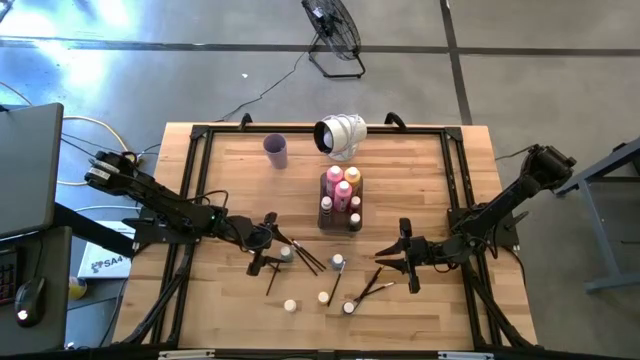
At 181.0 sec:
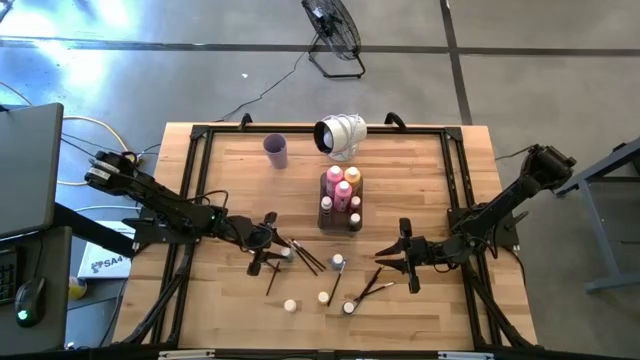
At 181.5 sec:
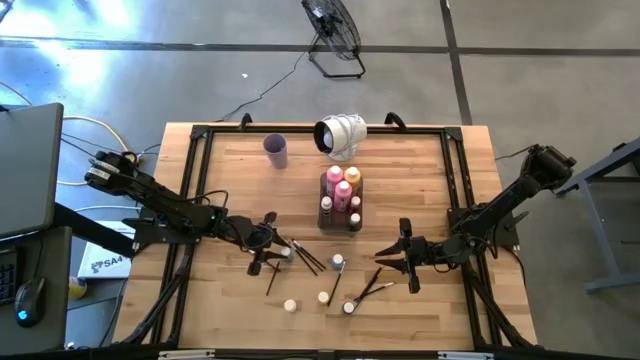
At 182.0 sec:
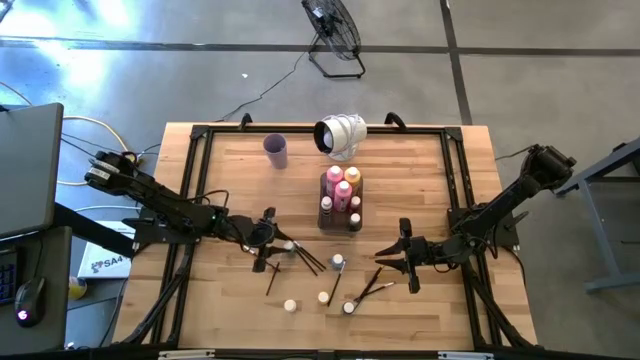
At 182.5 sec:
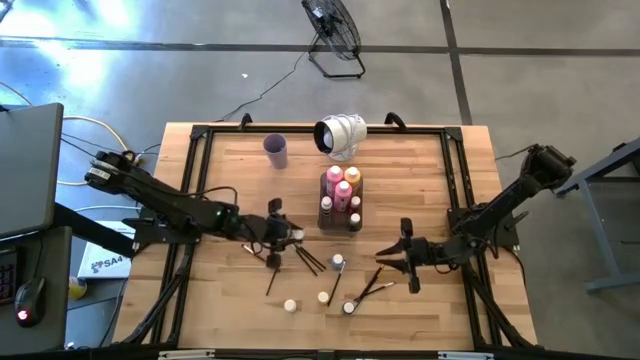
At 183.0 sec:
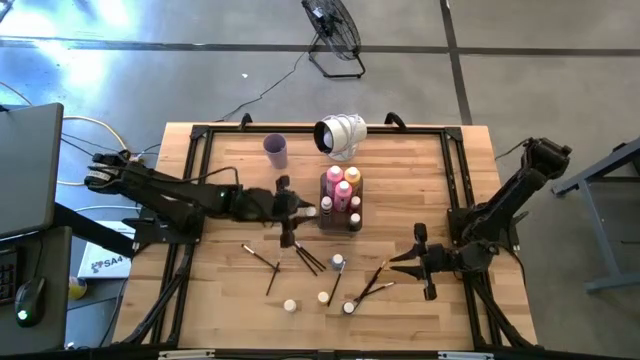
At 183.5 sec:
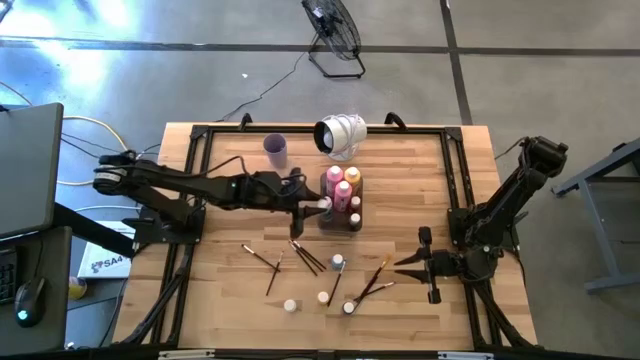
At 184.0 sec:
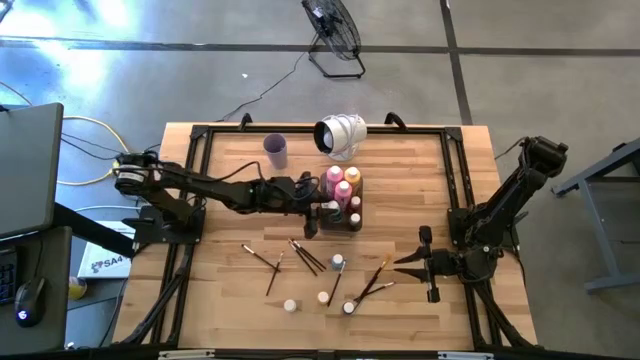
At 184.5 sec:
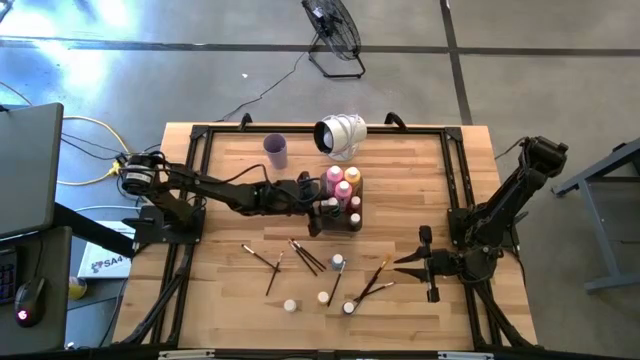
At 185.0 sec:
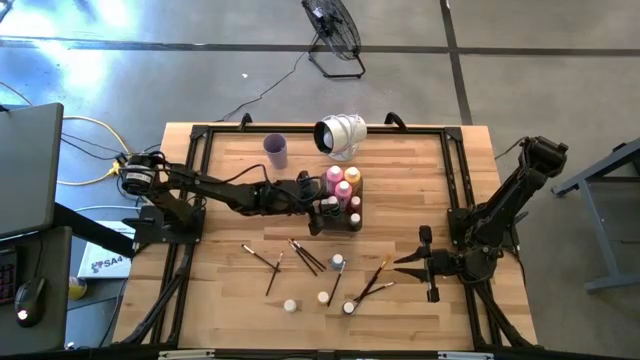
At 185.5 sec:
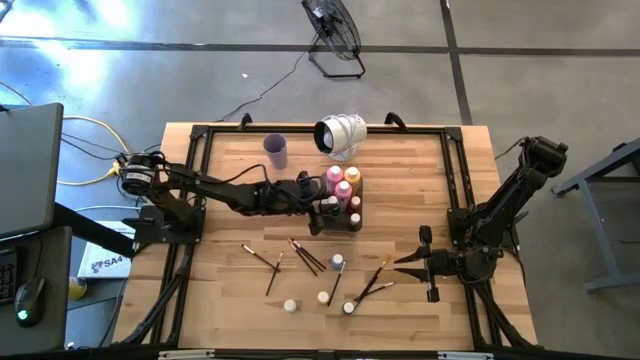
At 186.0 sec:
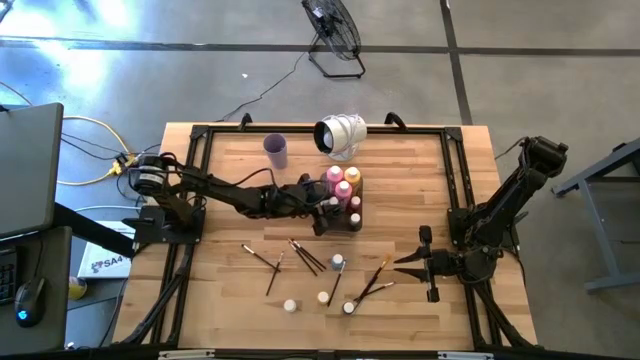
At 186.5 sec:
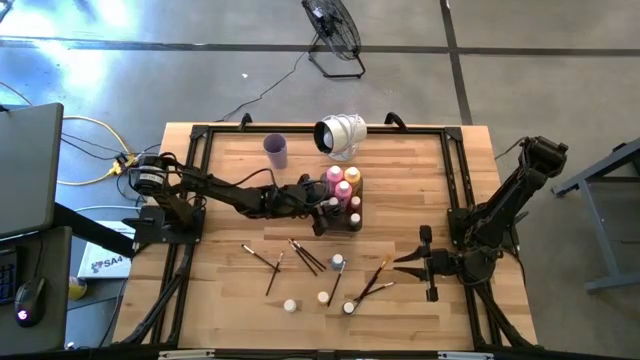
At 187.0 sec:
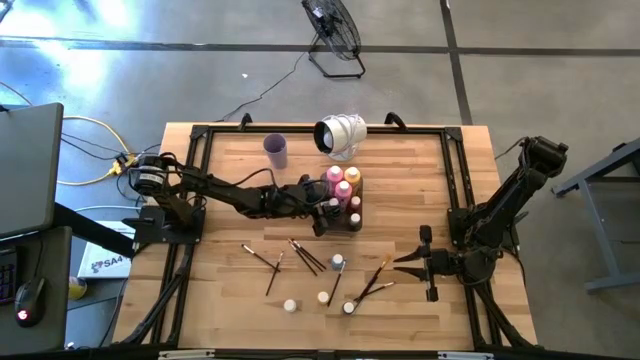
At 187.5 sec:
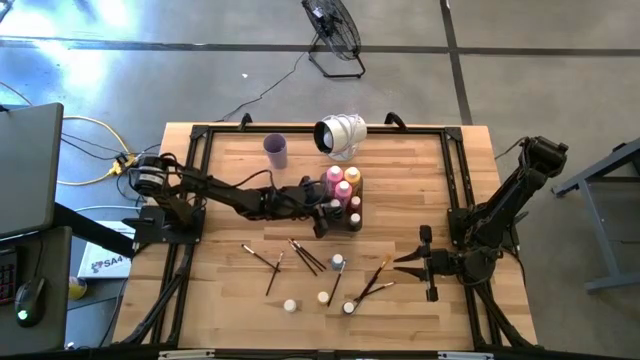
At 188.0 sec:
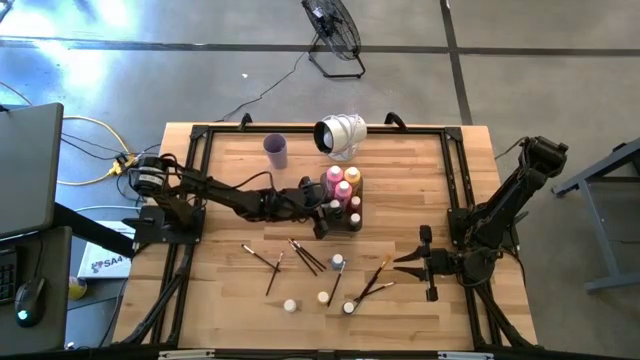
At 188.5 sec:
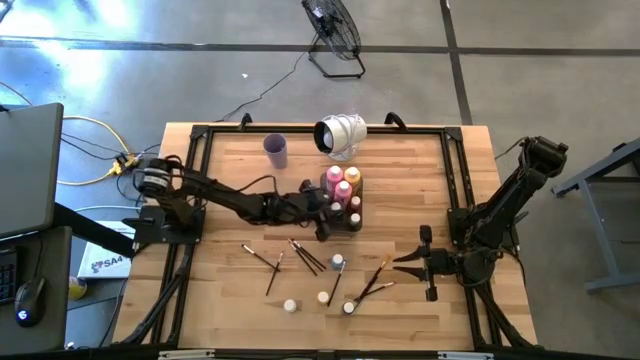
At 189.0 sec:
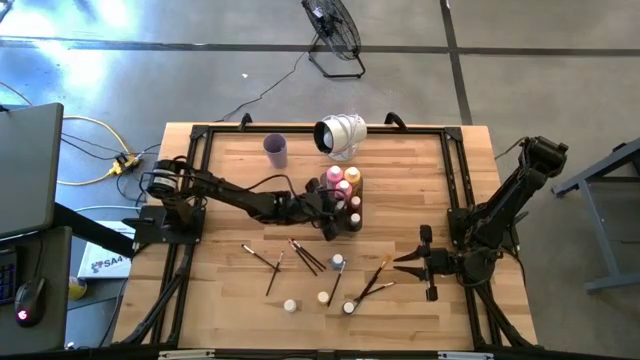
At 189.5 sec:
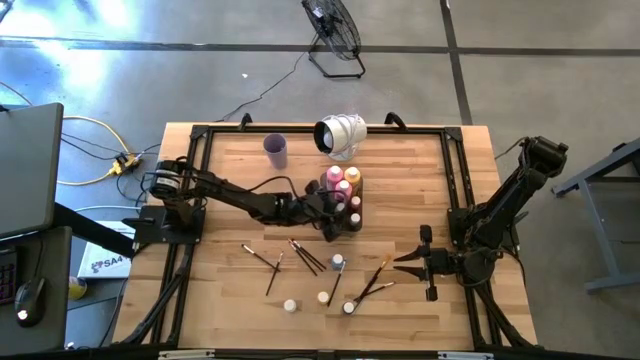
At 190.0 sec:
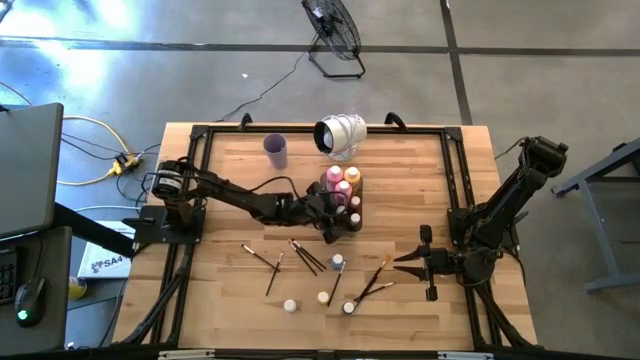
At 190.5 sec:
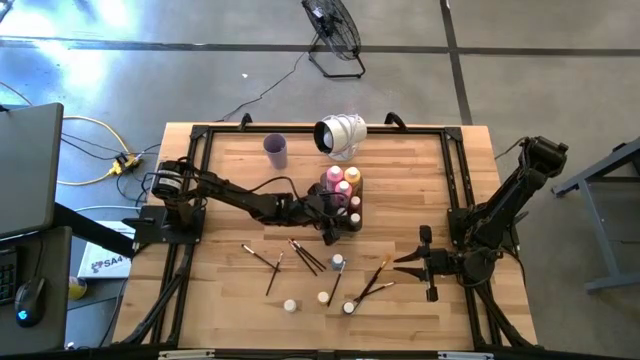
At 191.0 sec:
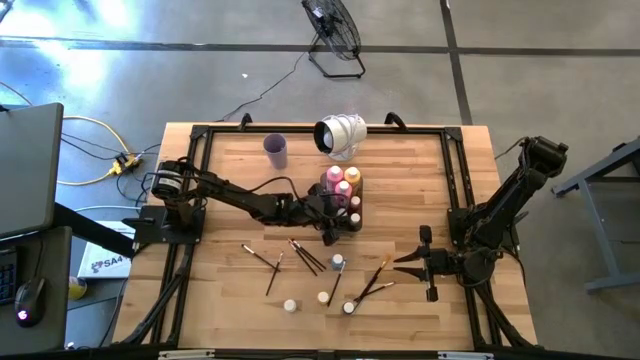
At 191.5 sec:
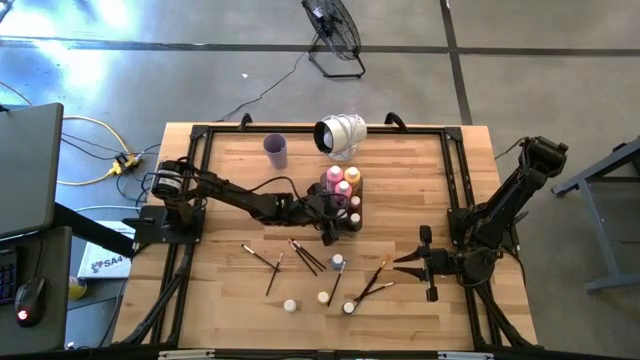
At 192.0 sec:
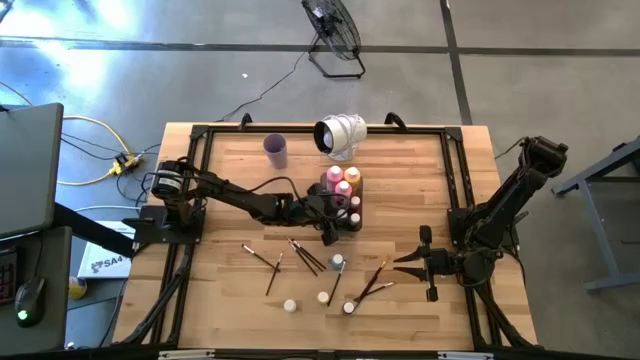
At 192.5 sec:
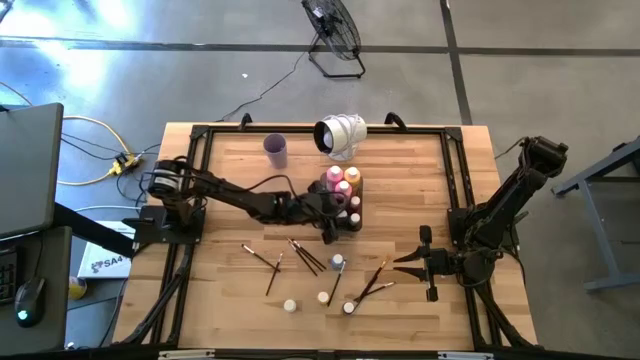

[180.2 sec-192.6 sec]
Task: Pick & Place Paint Supplies
Put the blue paint bottle into the black bin

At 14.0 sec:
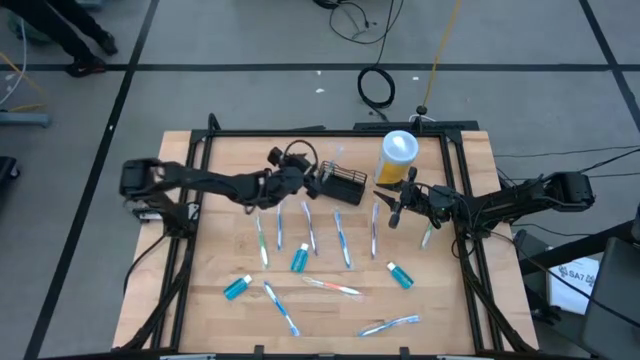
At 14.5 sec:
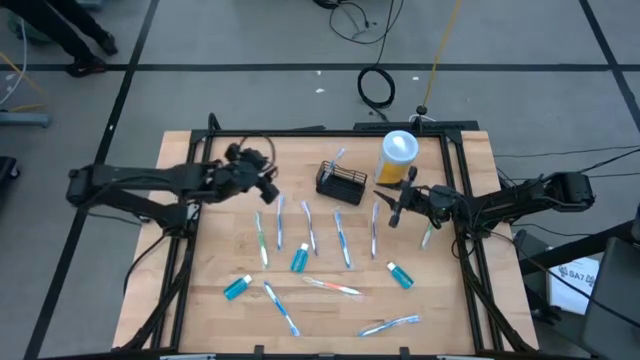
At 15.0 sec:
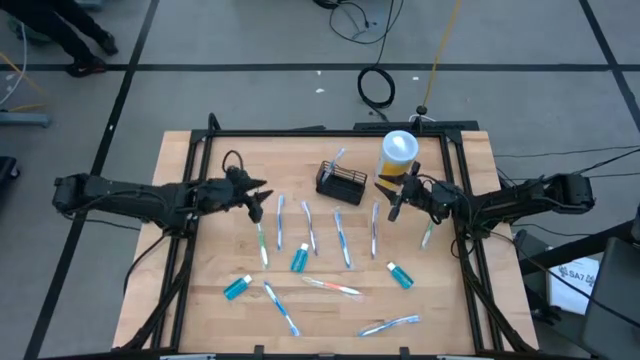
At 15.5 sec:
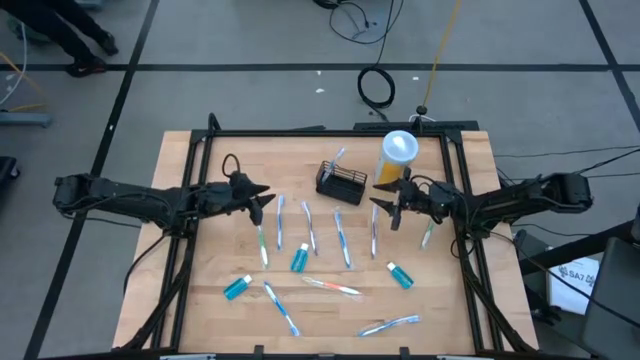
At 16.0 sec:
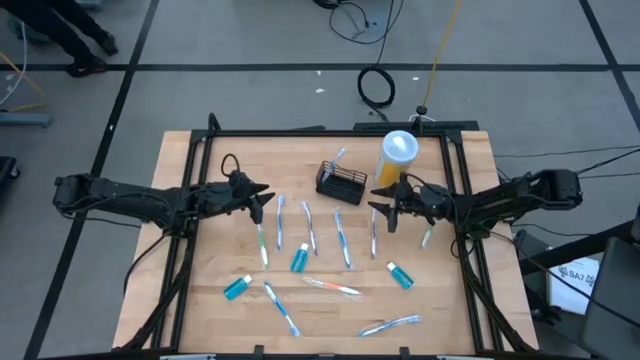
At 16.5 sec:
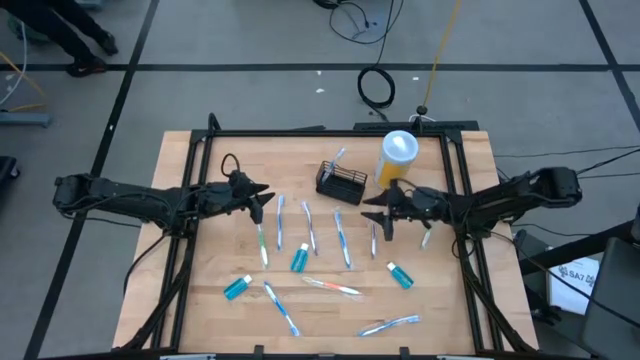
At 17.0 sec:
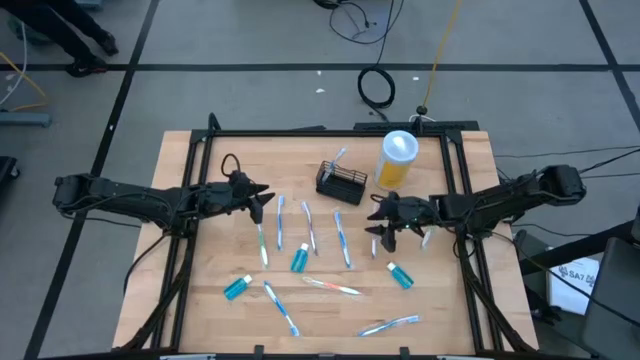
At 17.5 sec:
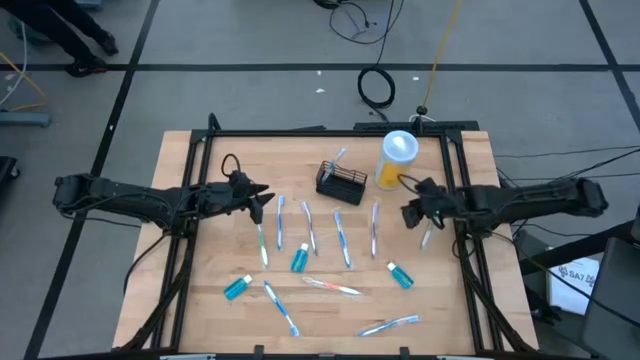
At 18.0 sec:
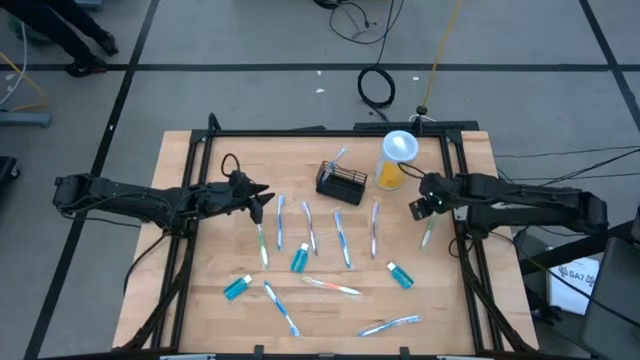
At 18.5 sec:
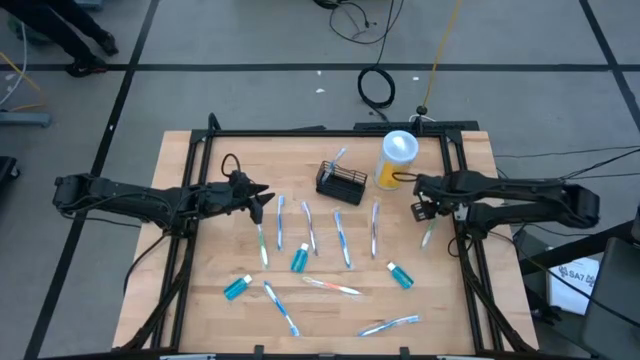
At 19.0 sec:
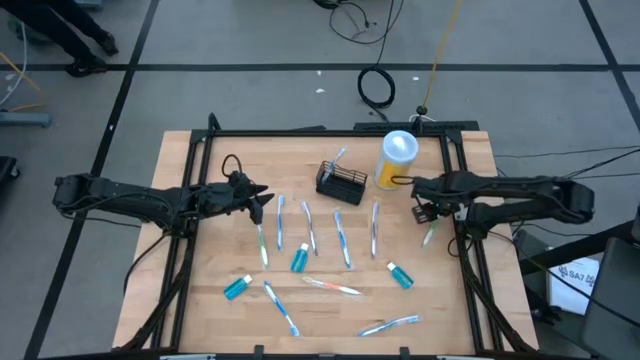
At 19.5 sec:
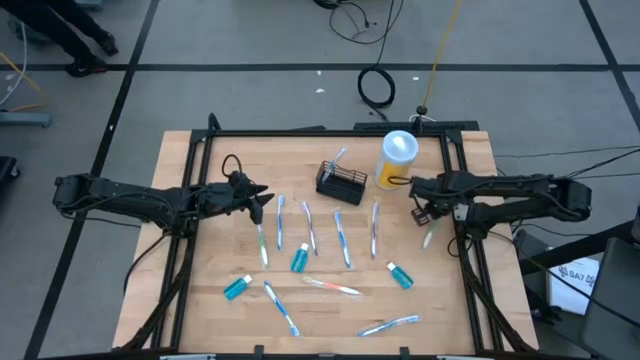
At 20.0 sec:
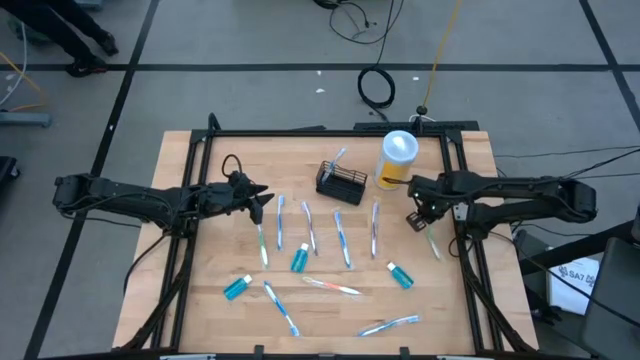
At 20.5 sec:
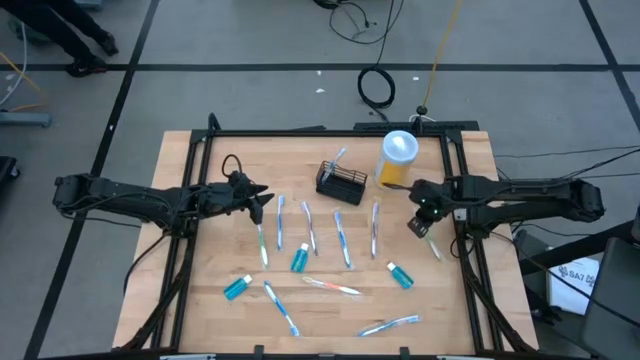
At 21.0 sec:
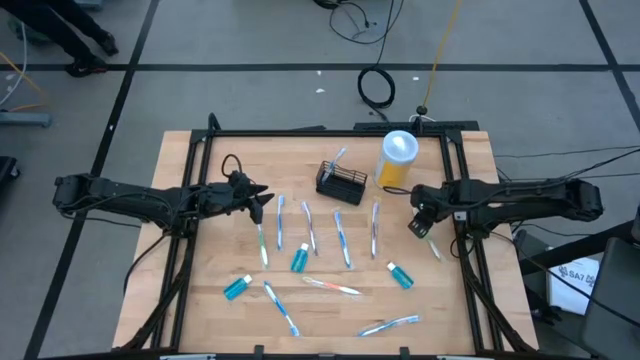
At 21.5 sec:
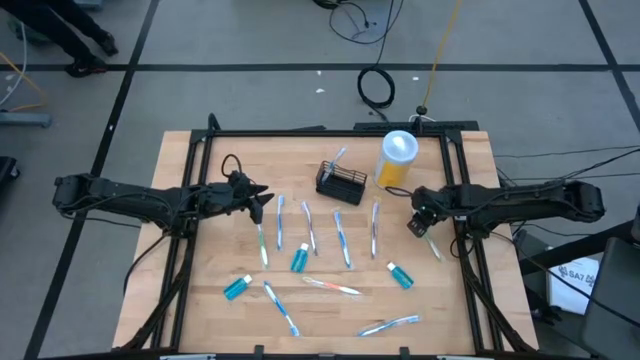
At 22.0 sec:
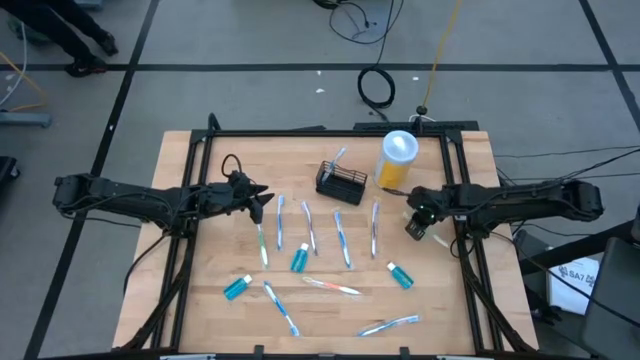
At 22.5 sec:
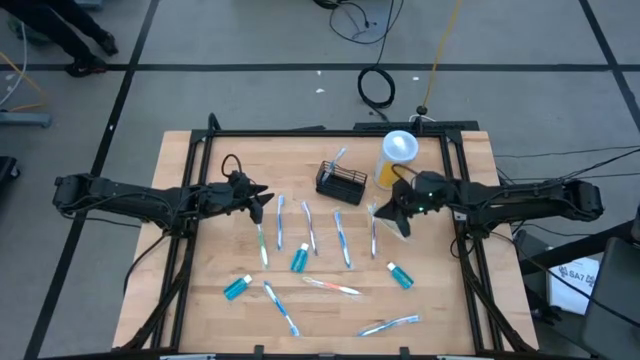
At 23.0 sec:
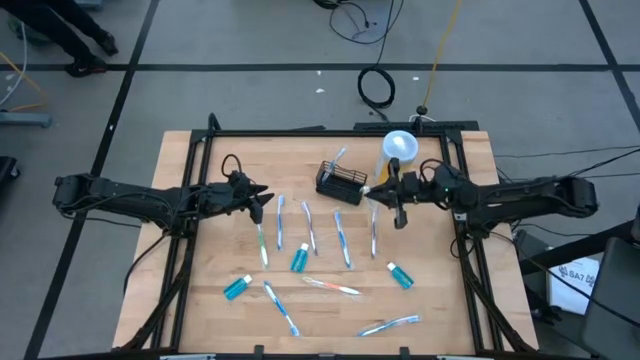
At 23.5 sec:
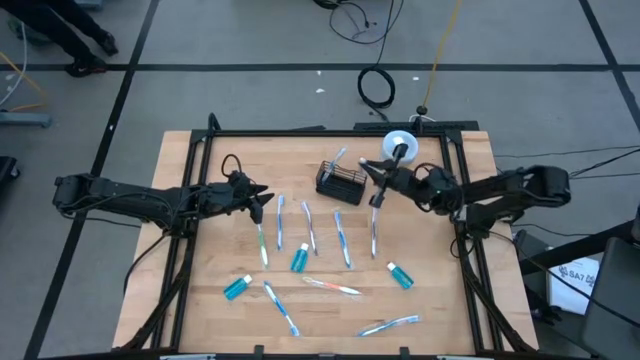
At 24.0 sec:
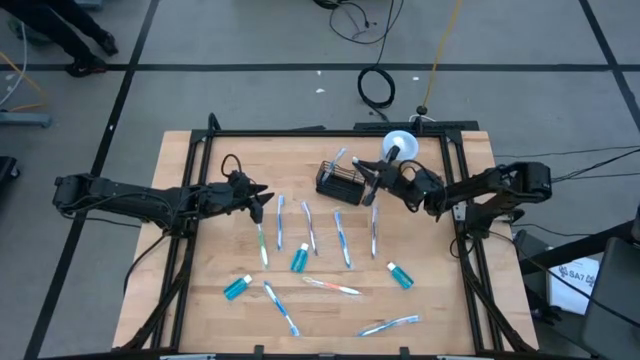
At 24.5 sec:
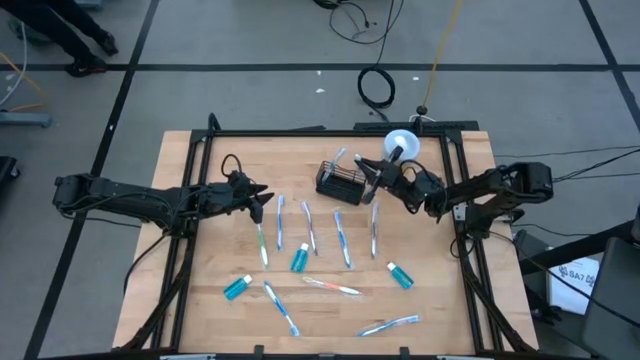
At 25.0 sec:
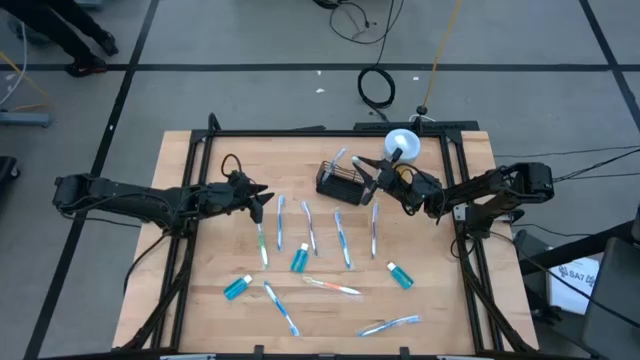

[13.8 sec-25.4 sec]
Task: Pick & Place toothbrushing station
Put the green toothbrush into the black organizer
